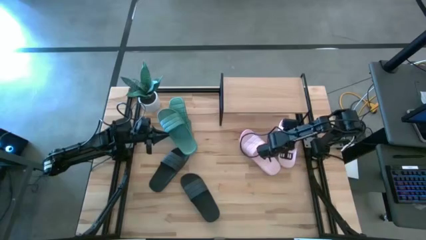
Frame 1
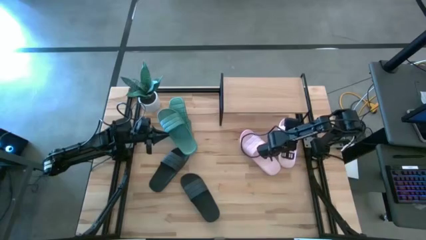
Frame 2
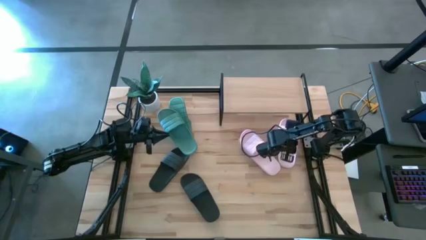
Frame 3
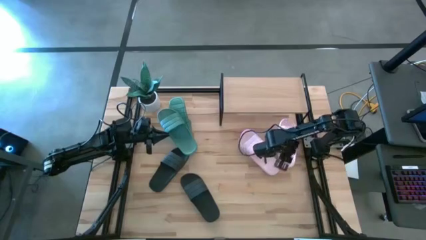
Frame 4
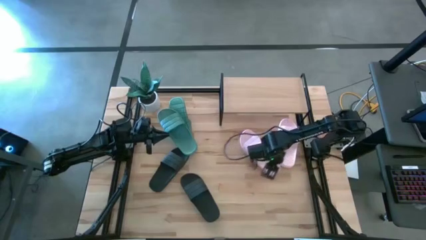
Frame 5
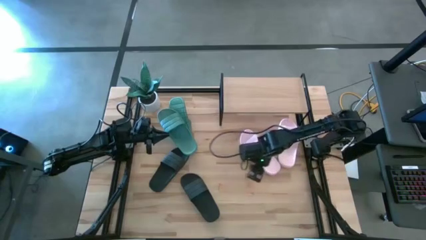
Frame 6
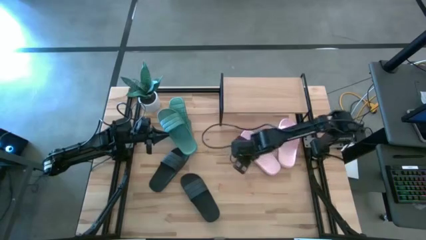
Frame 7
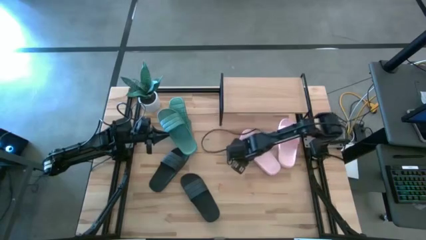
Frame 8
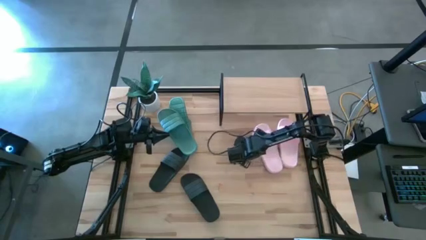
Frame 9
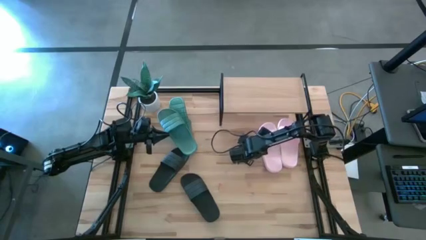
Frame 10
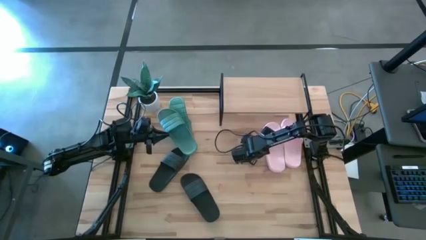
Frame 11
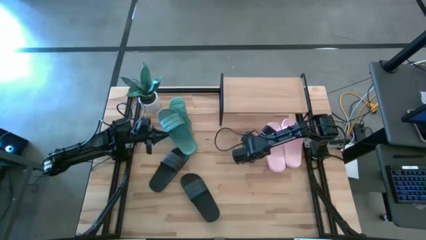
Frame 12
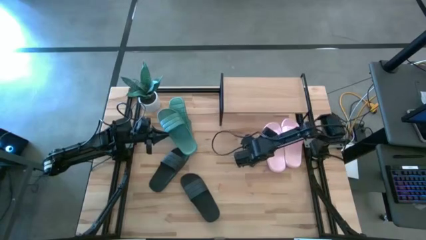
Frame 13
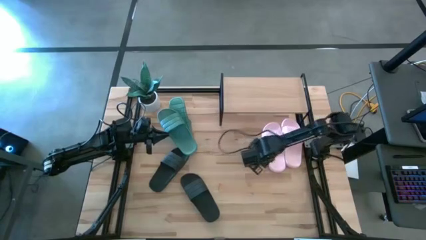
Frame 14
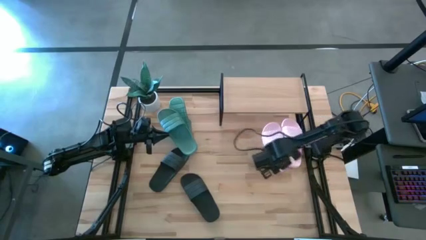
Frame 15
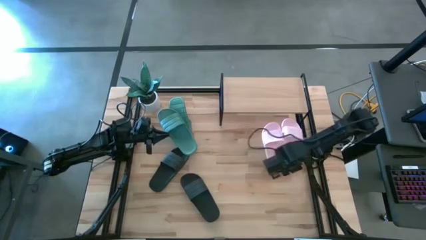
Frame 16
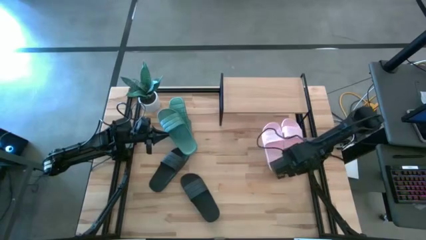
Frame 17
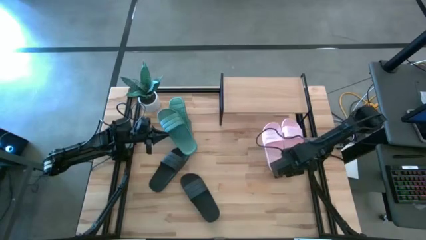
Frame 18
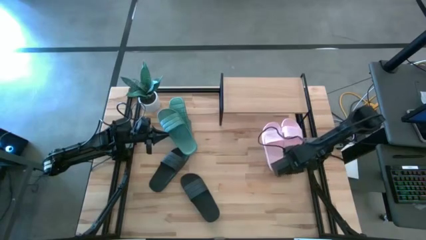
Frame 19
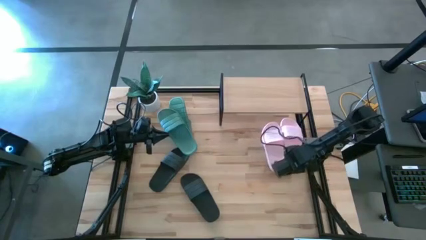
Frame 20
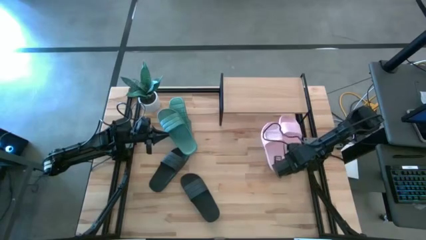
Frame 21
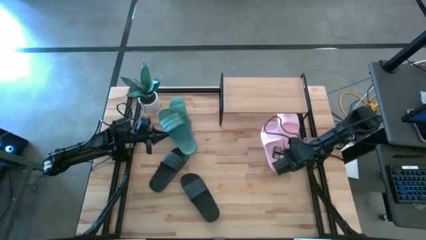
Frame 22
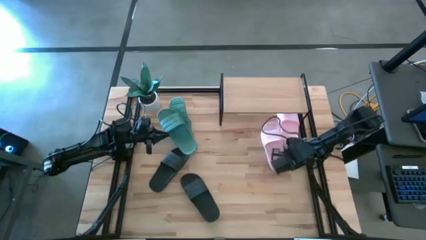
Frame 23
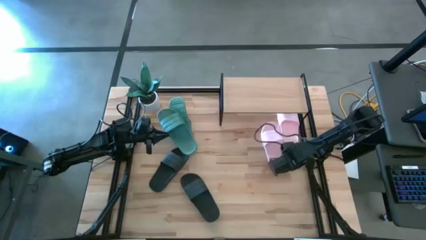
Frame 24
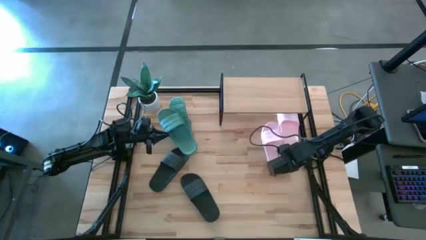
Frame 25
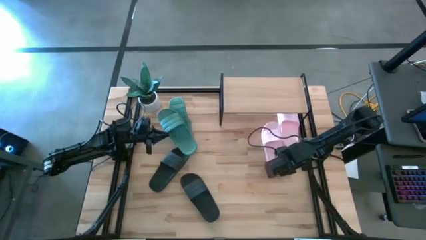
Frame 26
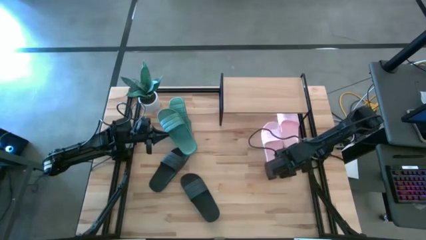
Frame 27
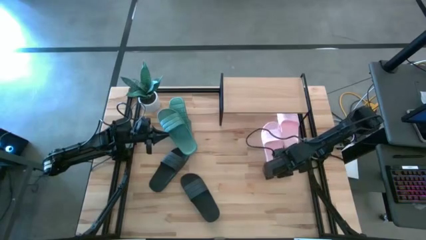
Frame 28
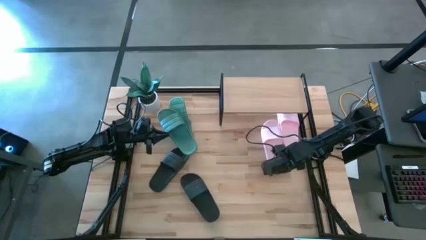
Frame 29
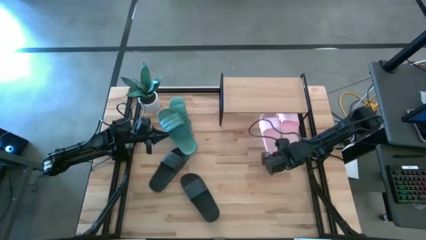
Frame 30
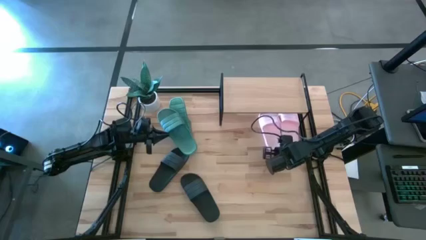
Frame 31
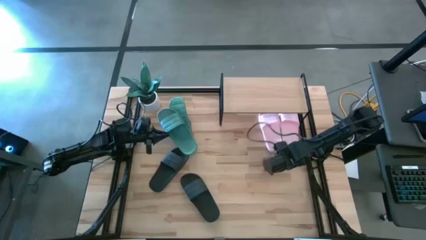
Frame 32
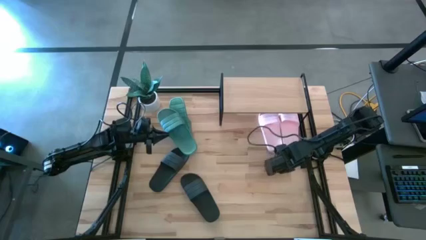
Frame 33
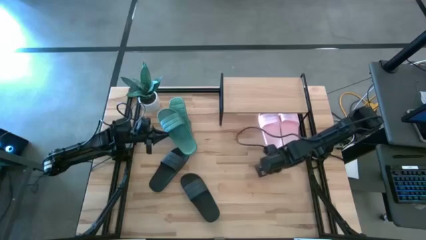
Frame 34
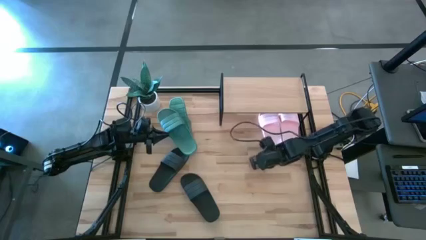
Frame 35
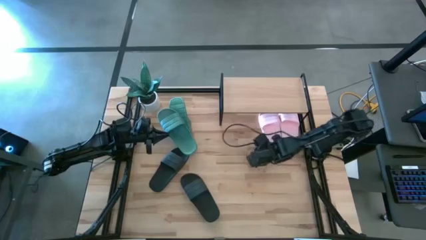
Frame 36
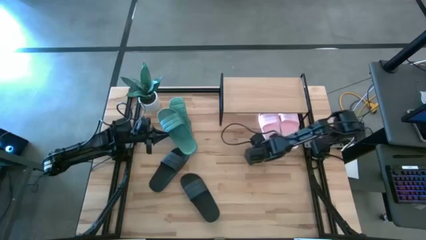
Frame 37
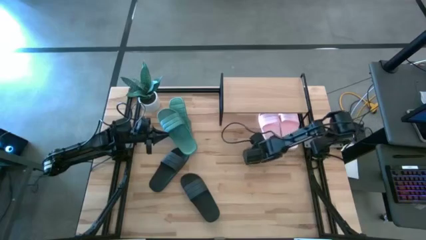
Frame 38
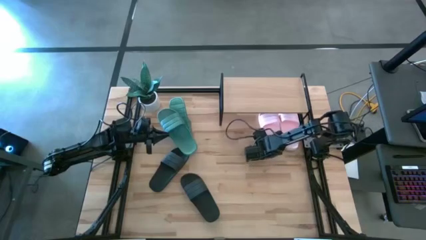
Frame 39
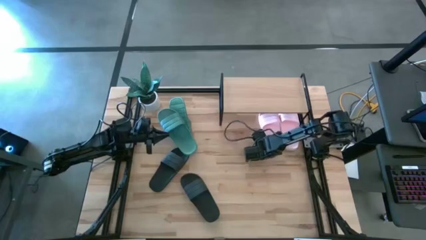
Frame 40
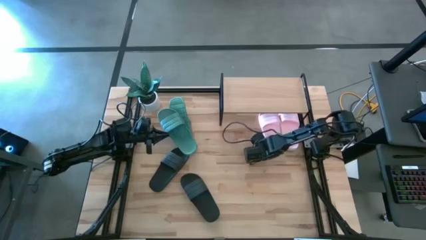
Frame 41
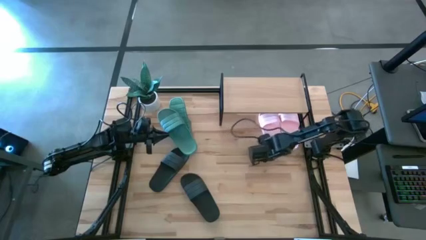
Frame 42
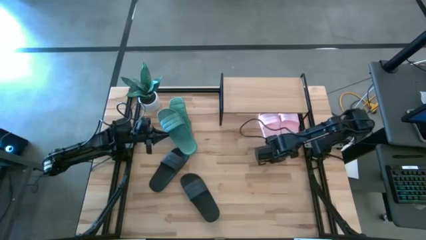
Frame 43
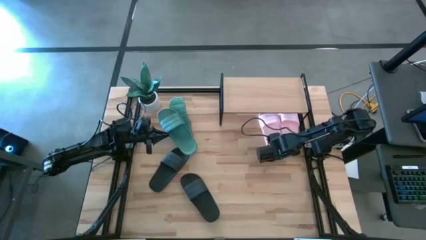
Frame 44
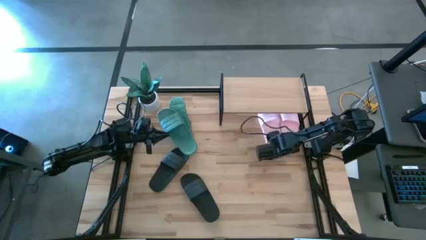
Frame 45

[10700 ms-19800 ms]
Task: Pick and place slides into the shelf
Adjust the pink slides under the shelf

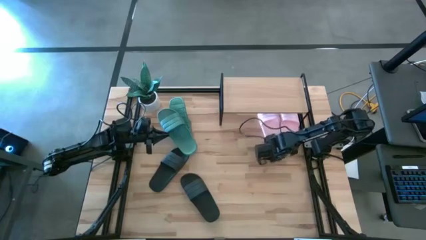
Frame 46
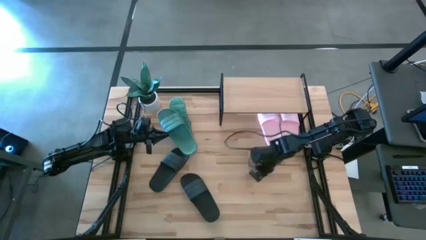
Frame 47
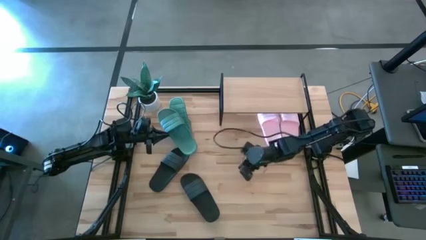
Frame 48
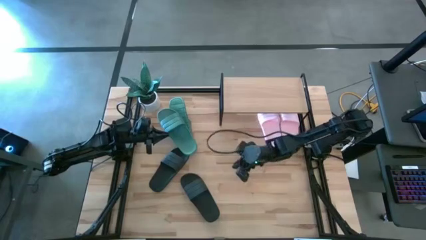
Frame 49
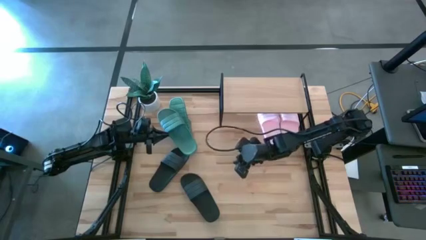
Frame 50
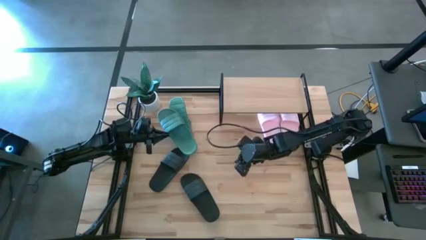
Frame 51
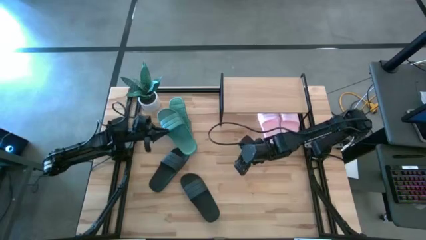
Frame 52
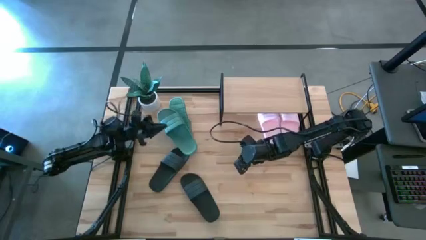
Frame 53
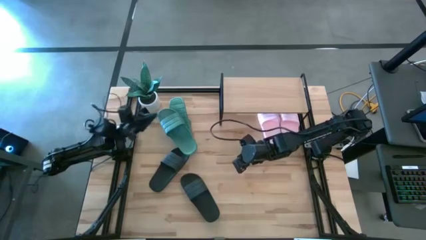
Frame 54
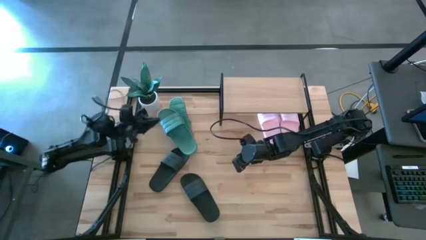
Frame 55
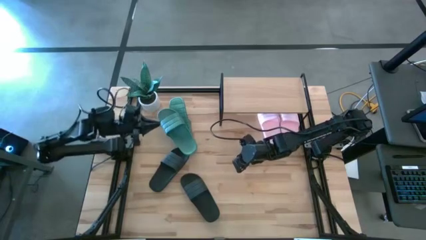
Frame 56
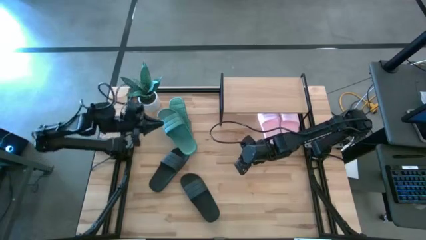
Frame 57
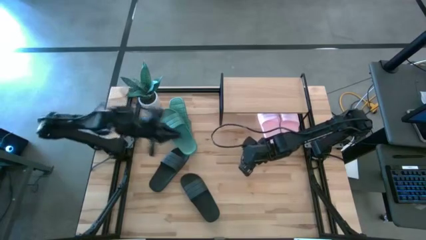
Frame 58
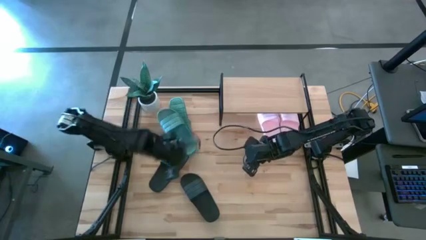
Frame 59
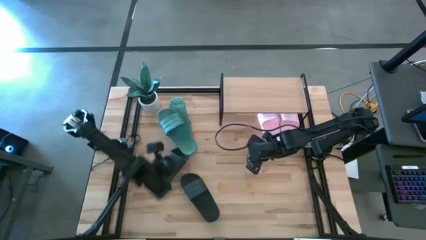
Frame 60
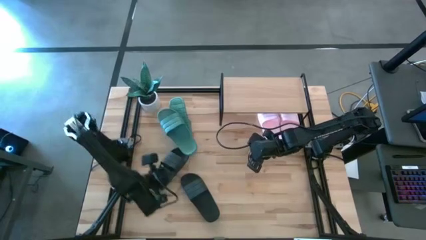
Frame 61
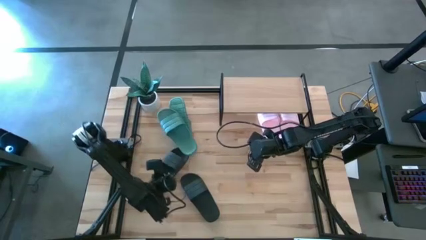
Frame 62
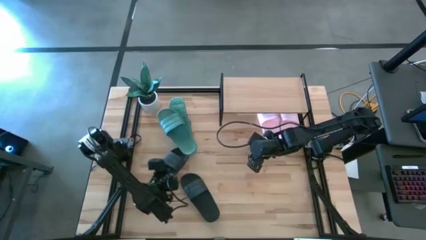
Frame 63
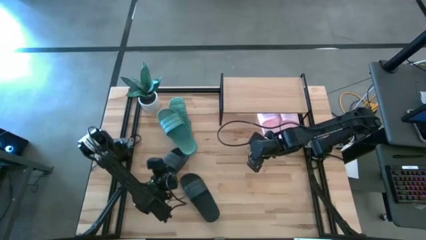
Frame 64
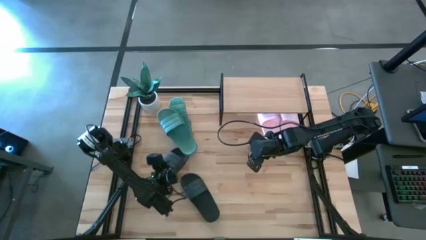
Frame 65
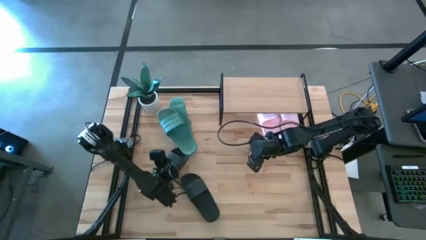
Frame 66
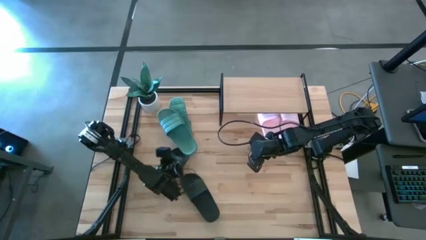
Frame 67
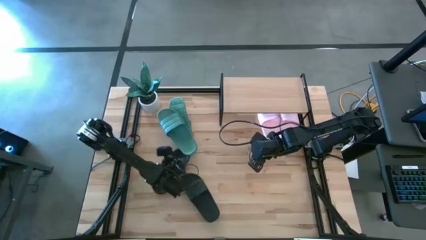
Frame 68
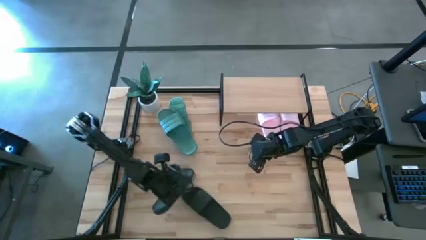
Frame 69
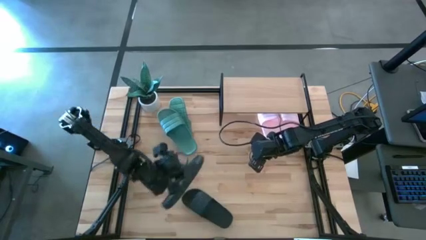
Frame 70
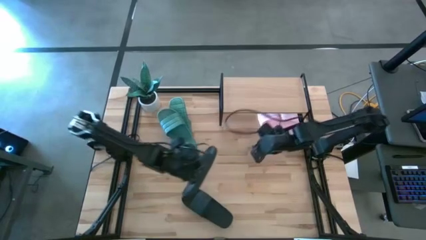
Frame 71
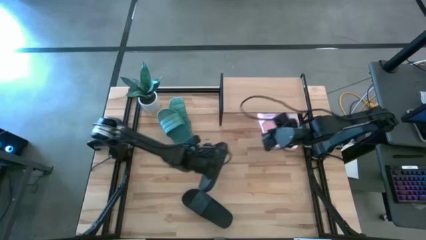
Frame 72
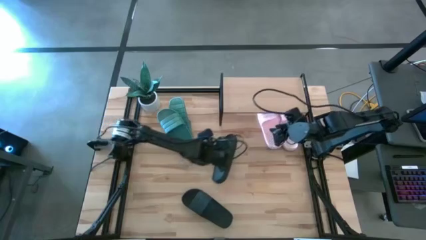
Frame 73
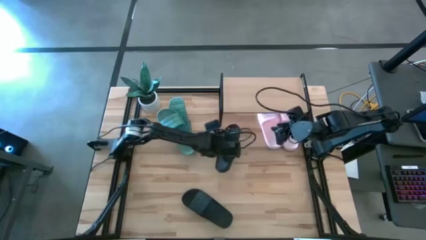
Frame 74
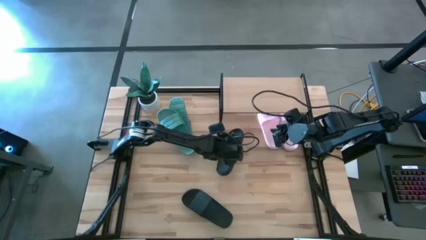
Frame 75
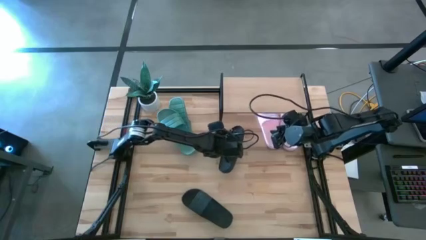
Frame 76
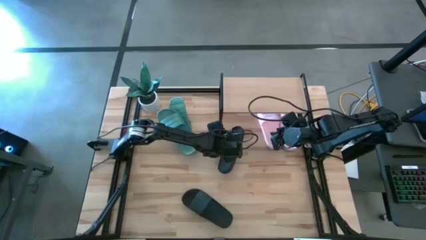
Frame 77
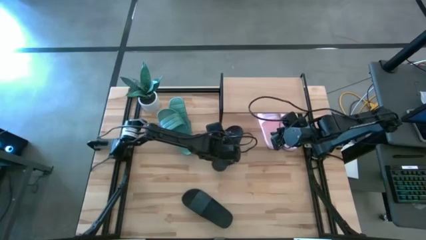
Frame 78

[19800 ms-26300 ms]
Put the top black slide under the shelf
